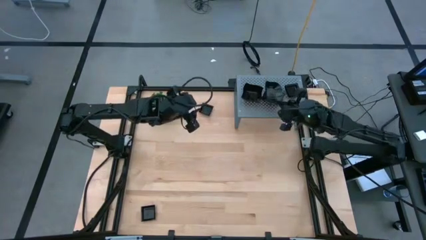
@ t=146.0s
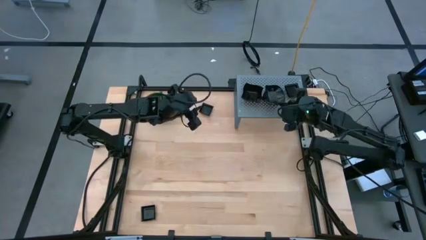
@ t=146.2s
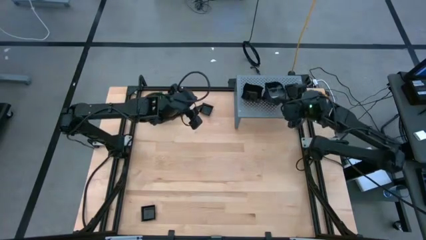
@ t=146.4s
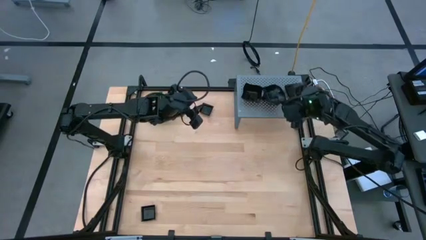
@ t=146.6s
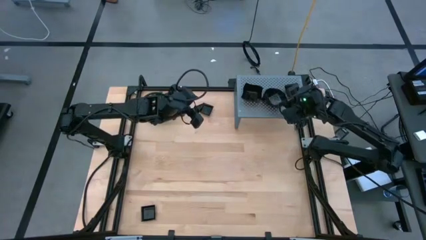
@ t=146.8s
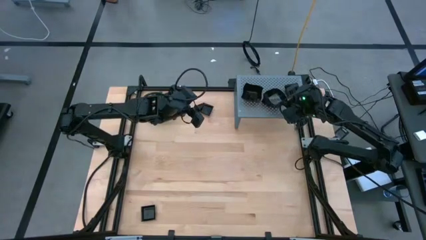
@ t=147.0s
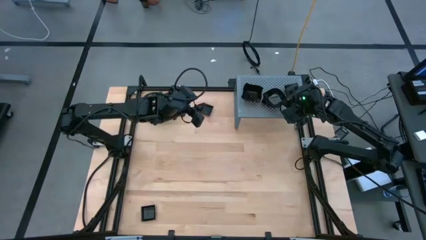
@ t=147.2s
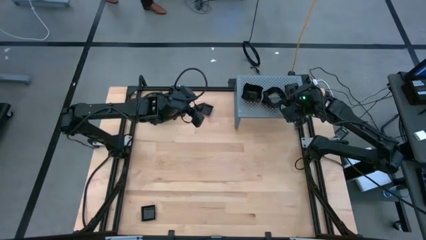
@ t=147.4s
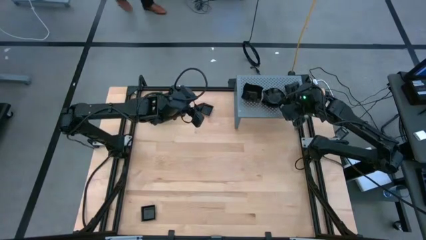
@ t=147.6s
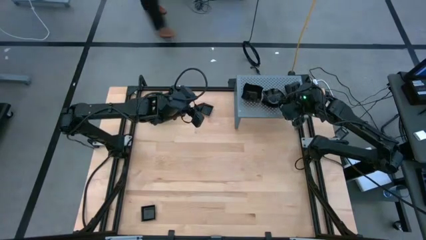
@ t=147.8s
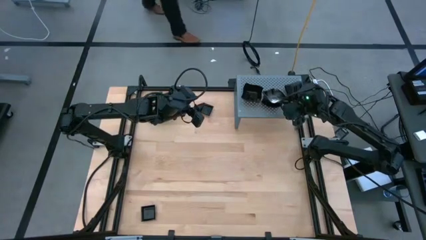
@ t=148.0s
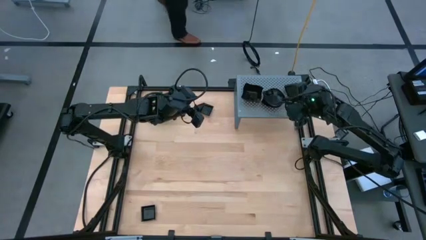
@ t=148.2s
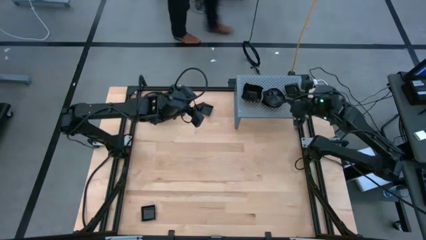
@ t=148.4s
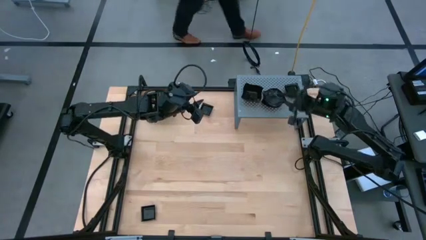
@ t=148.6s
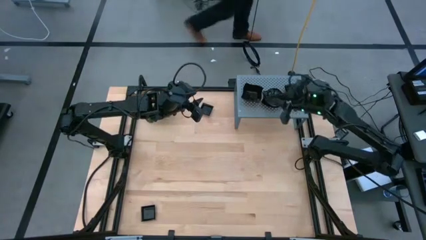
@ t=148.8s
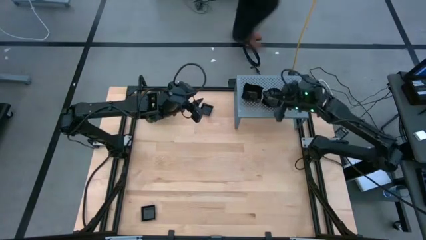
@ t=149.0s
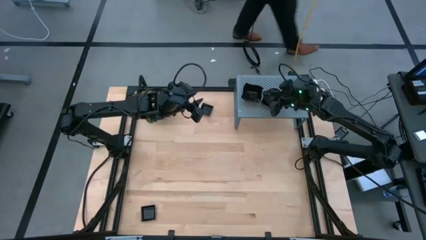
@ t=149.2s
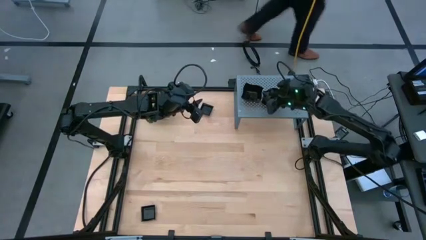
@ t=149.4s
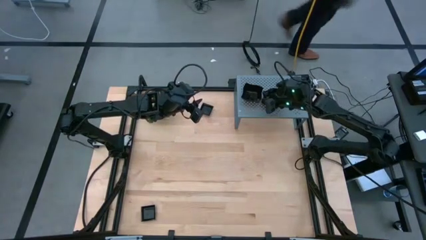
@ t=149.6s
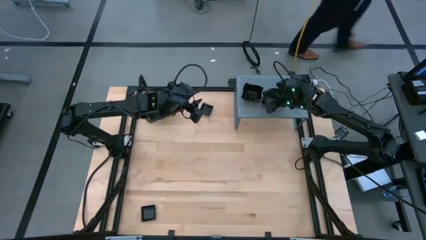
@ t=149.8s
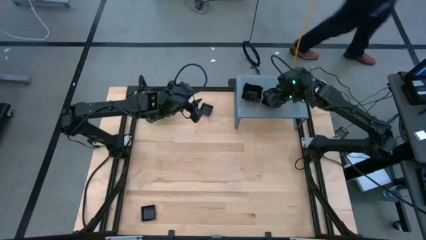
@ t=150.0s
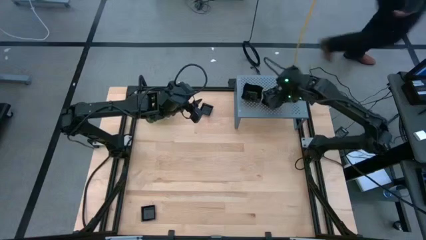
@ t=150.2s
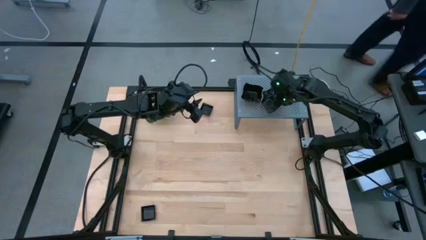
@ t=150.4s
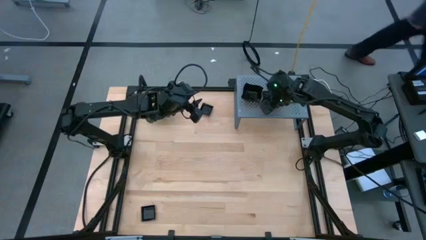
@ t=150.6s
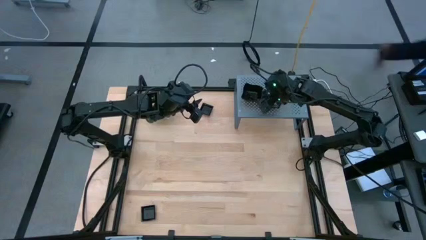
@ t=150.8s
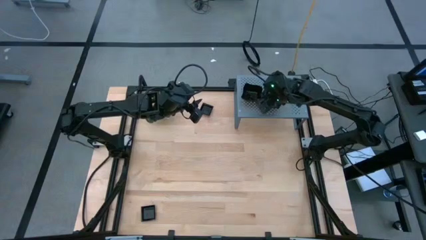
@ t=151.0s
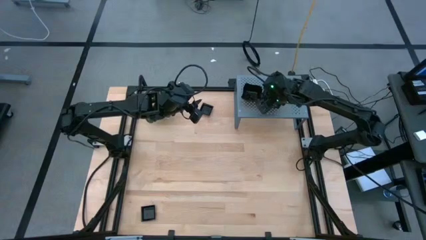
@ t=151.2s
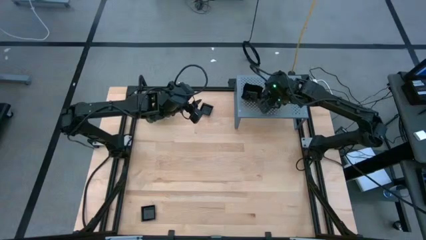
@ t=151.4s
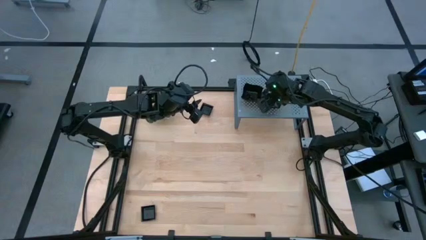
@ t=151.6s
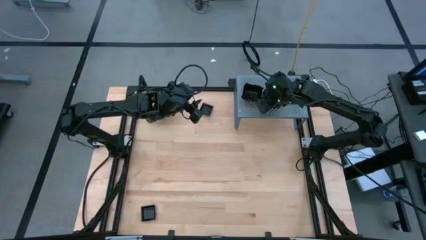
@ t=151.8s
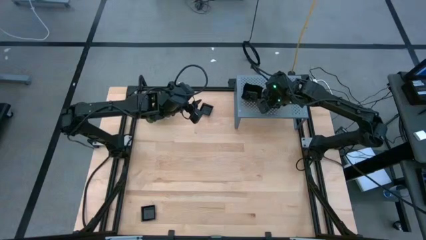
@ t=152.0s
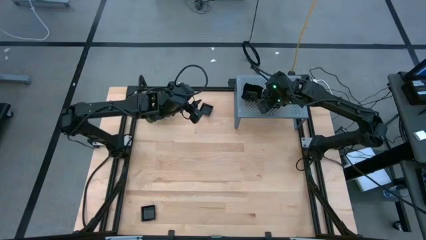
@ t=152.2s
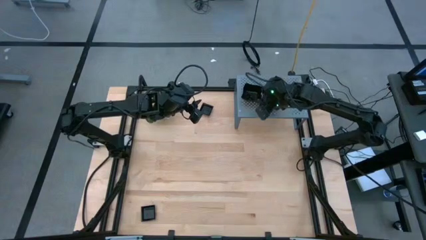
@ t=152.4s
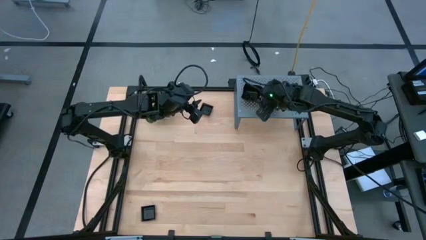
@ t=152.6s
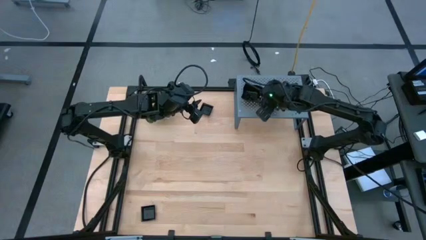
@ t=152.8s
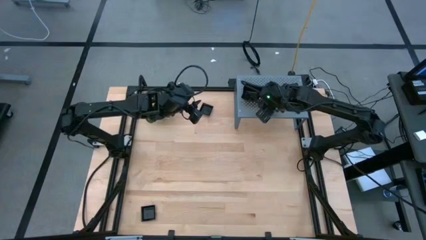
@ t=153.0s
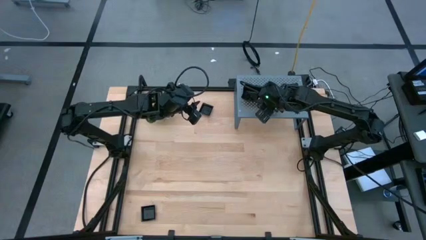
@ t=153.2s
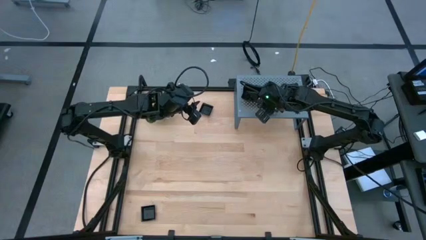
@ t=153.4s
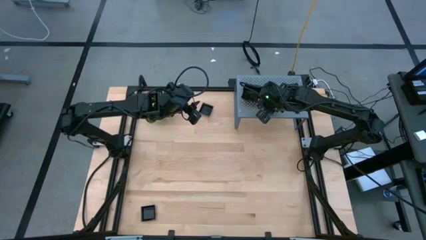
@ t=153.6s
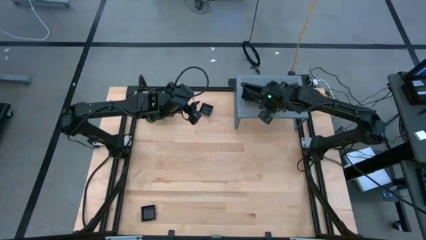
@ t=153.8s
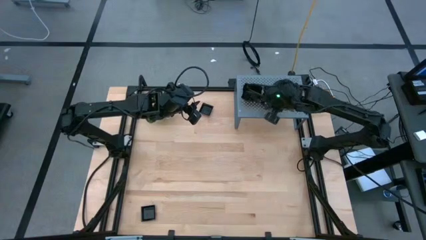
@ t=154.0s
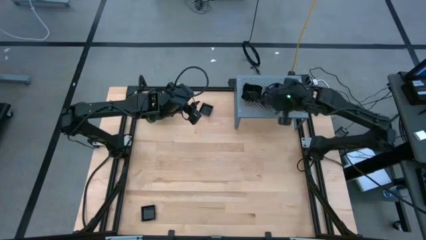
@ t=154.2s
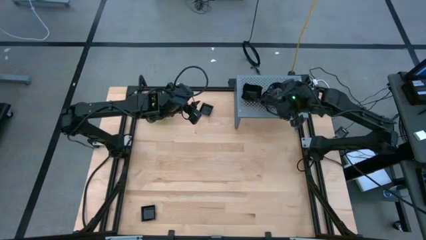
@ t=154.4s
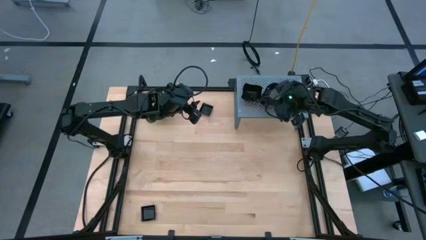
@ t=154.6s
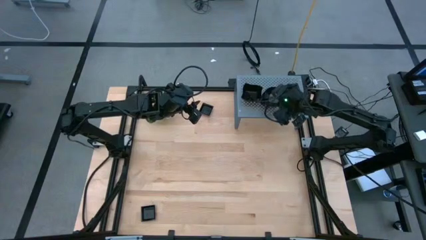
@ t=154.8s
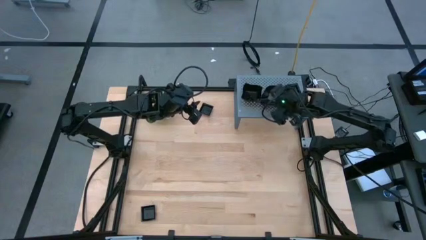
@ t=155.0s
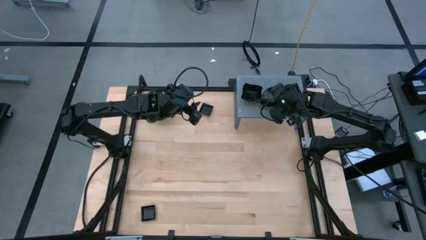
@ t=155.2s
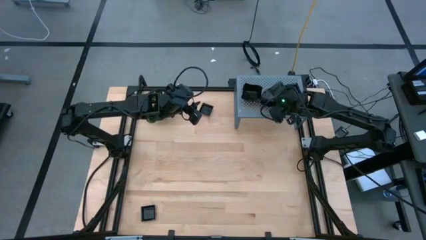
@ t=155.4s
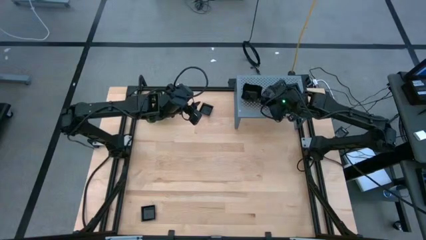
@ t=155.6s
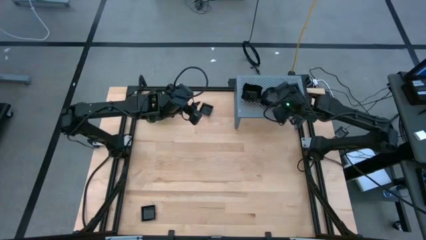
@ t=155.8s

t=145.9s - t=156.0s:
Task: Pick & Place Mini shaped plates
Stack the leaf shaped plate on top of the leaf shaped plates on the shelf

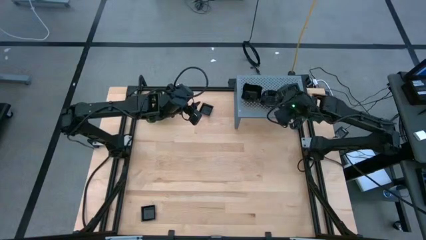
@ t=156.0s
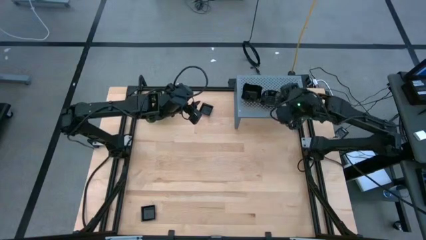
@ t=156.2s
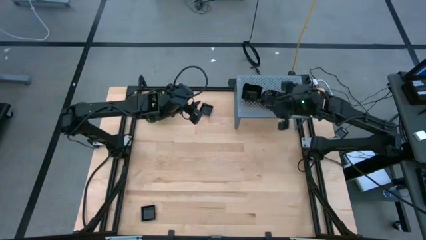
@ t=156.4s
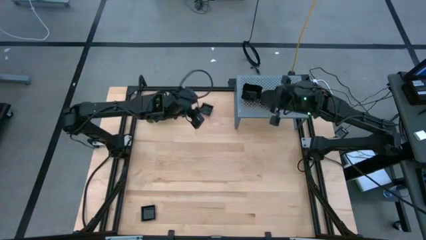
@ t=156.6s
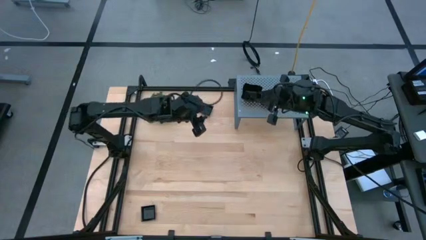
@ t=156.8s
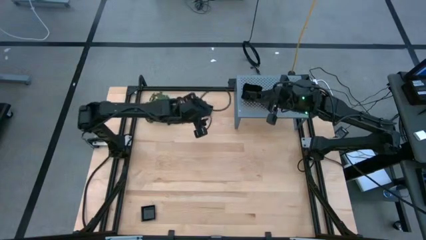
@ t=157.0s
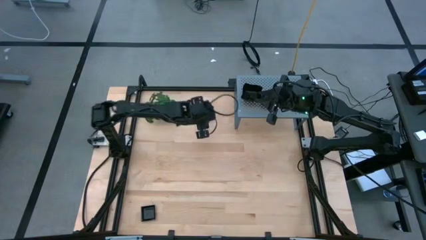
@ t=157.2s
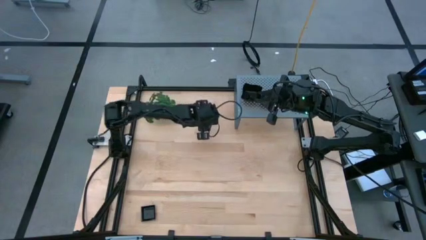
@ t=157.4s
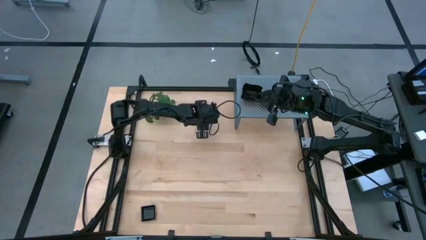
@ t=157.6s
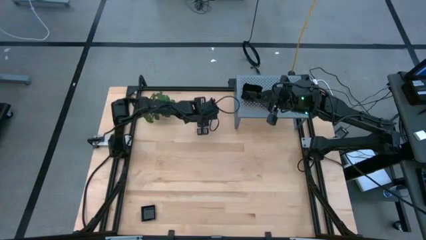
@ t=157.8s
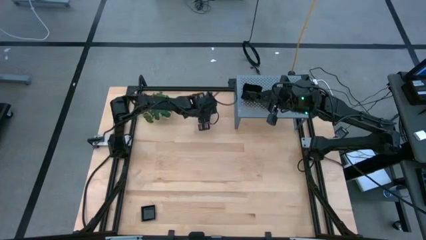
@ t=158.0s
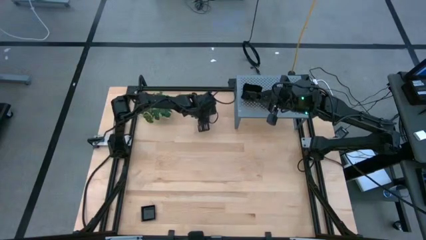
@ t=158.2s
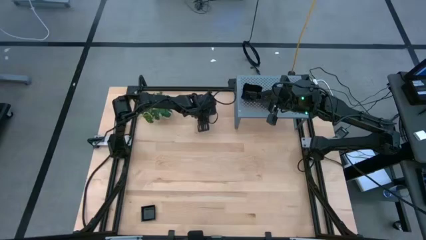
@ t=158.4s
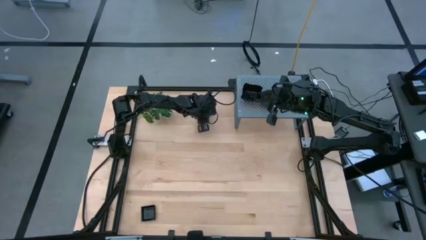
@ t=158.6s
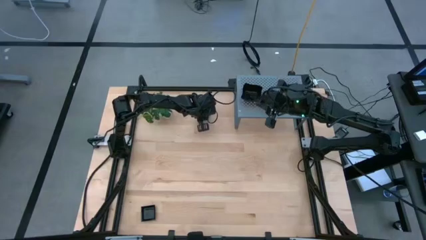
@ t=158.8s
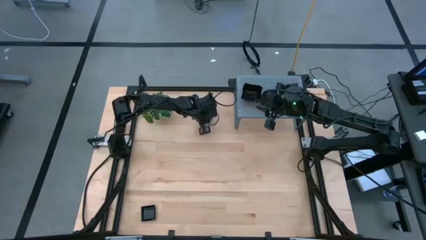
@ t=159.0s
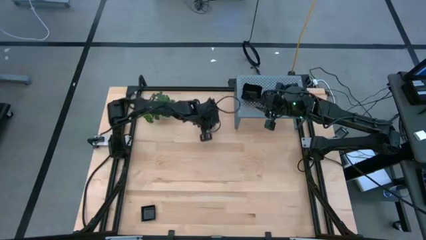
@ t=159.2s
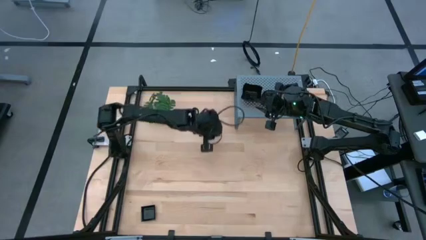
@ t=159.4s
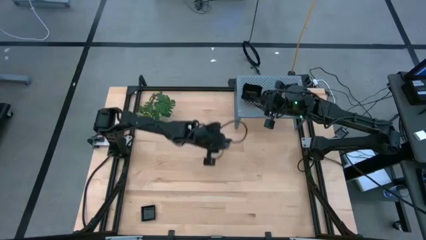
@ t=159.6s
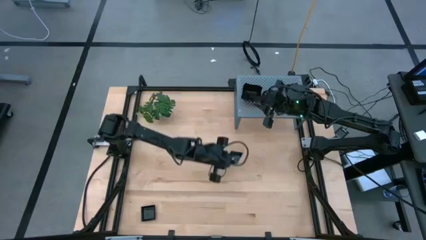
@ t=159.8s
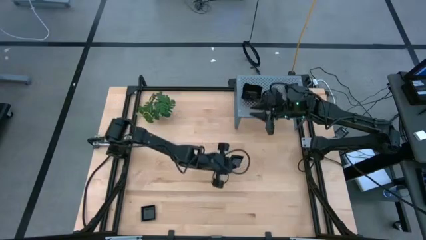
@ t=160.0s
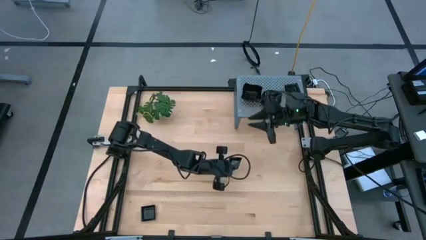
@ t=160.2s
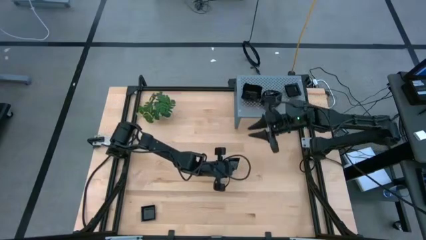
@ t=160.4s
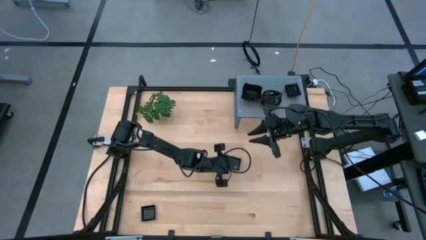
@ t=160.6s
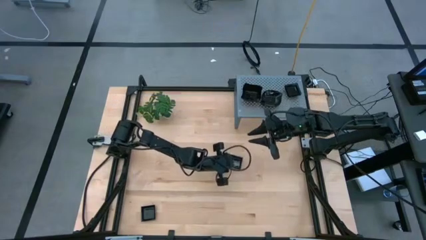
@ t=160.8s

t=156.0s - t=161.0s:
Move the square plate to the center of the table

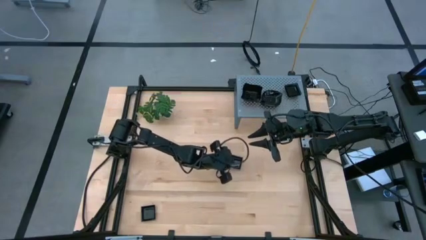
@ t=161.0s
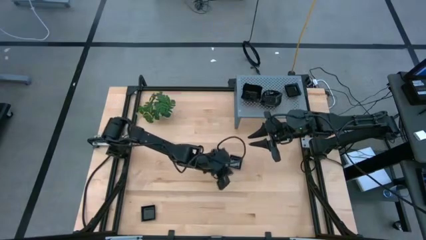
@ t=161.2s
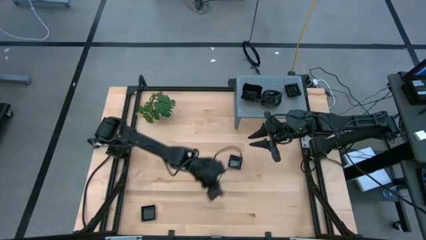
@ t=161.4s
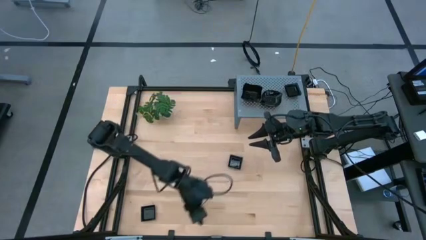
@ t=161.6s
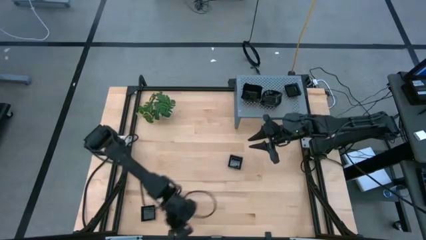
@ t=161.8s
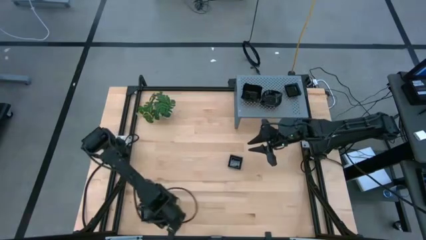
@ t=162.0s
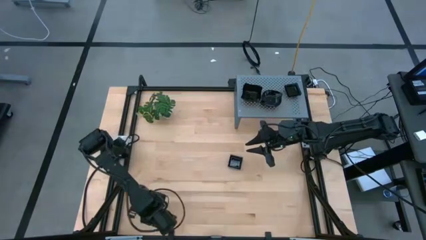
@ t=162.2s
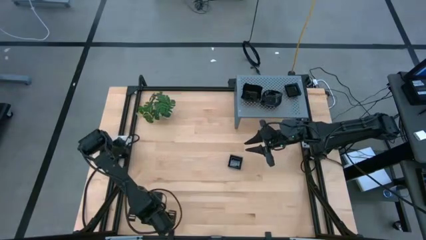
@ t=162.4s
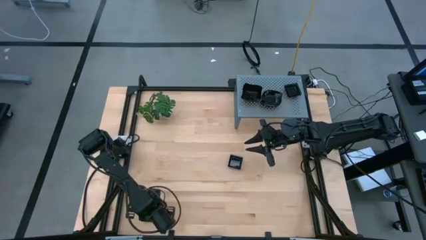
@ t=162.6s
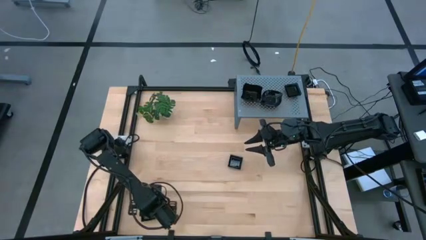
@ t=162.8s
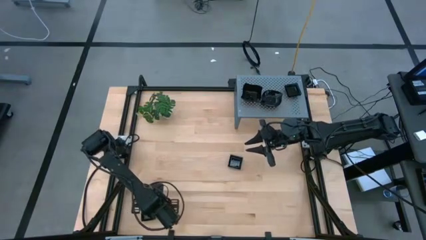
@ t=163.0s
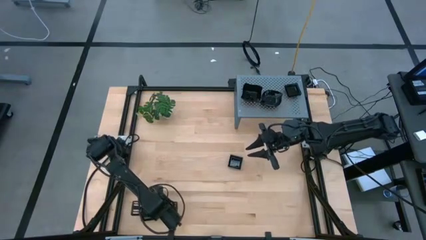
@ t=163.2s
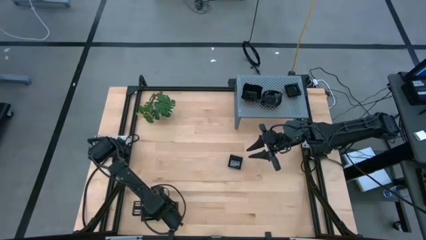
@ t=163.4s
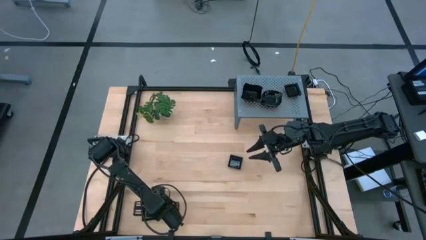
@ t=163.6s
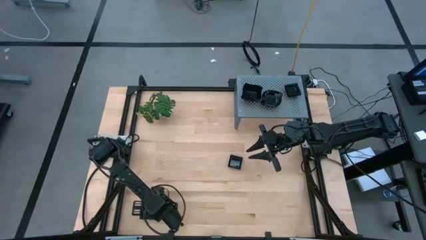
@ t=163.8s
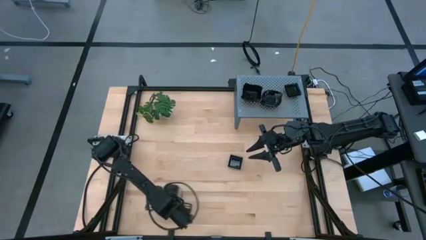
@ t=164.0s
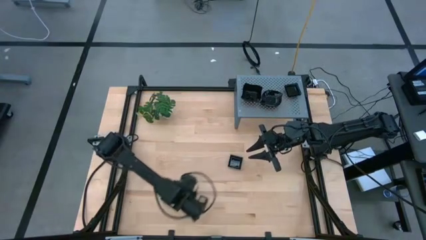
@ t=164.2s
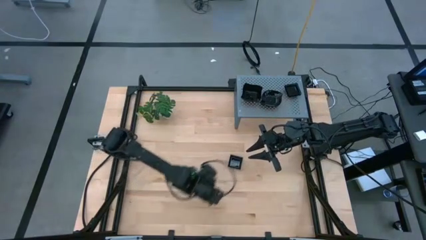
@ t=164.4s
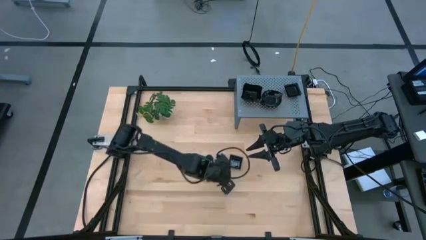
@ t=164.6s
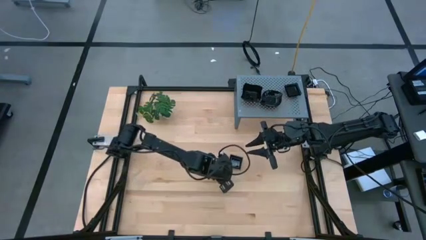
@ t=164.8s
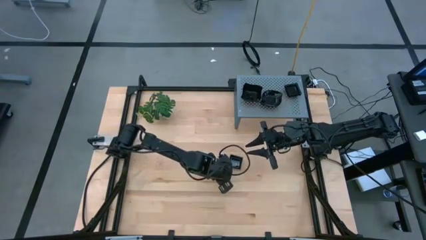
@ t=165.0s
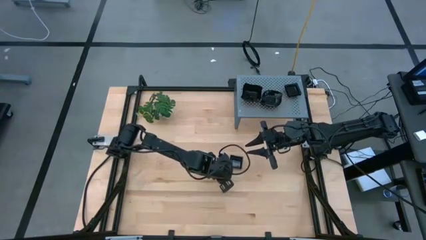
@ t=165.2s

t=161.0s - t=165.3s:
Move the square plate to the center of the table
